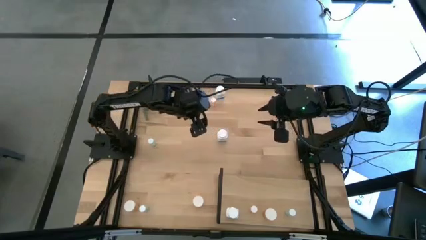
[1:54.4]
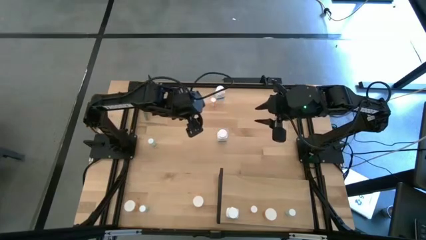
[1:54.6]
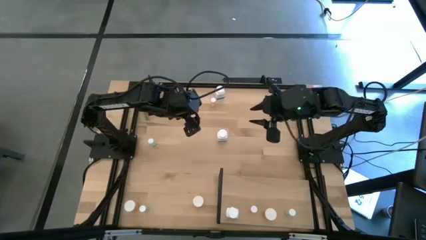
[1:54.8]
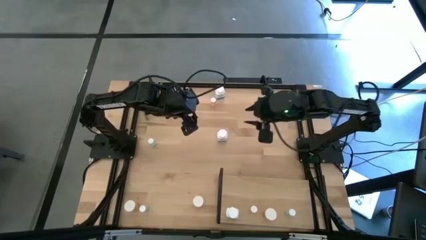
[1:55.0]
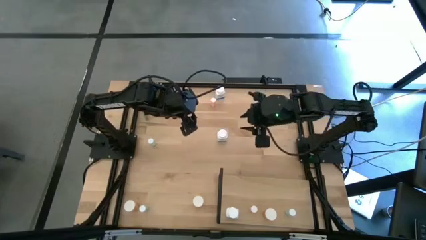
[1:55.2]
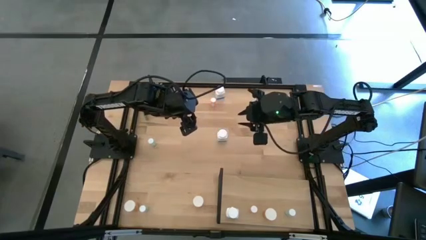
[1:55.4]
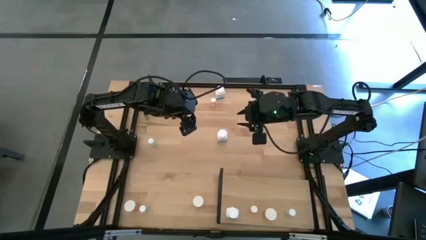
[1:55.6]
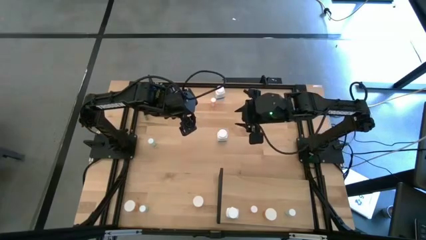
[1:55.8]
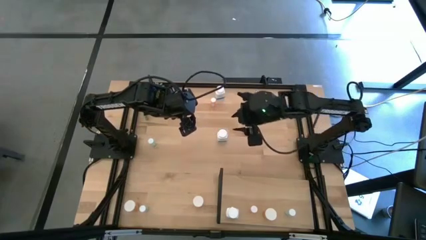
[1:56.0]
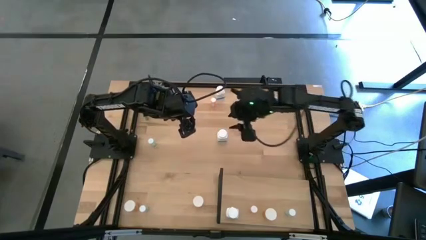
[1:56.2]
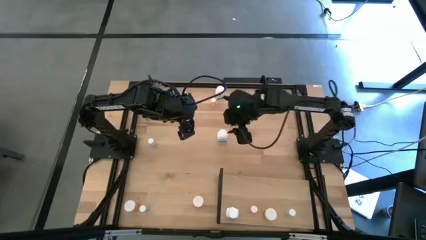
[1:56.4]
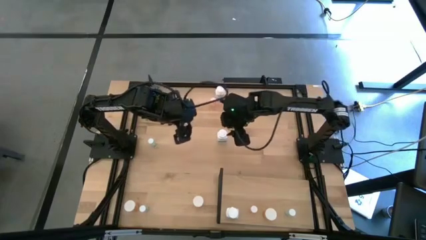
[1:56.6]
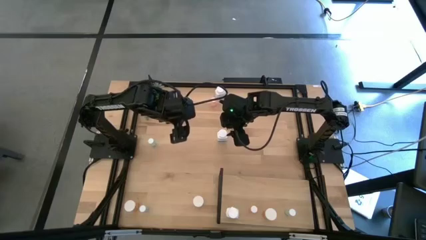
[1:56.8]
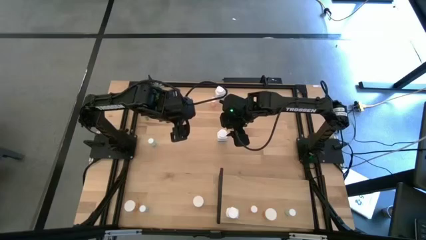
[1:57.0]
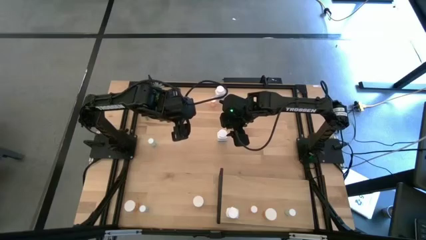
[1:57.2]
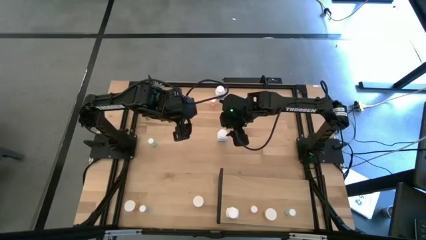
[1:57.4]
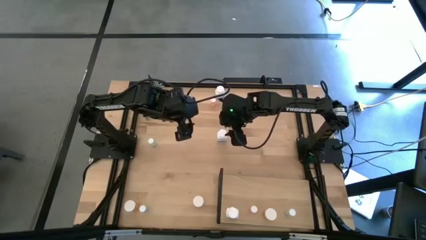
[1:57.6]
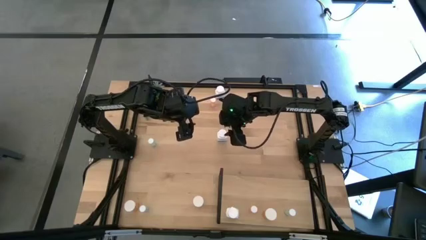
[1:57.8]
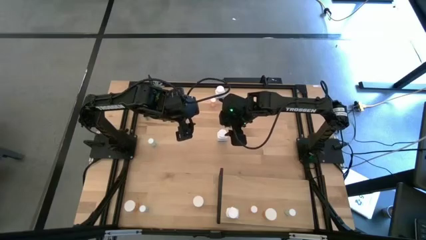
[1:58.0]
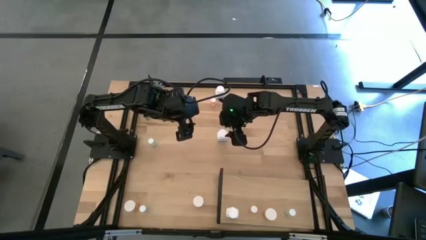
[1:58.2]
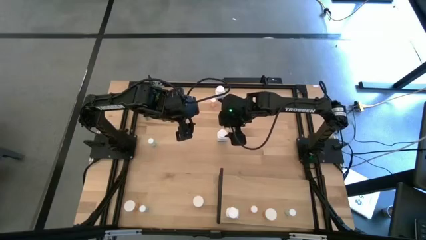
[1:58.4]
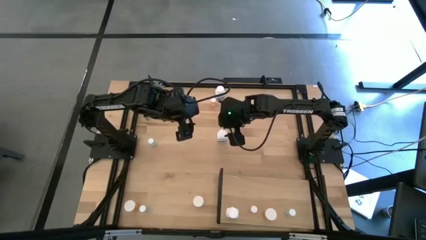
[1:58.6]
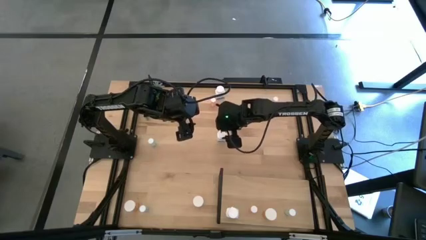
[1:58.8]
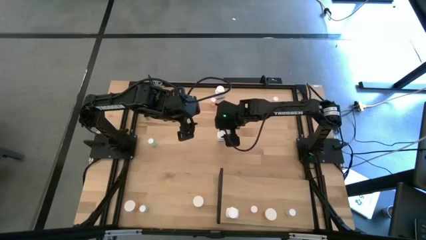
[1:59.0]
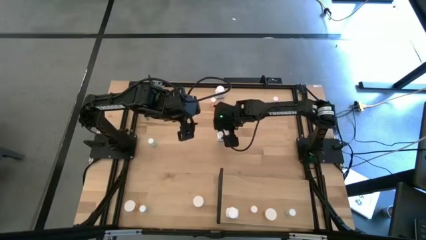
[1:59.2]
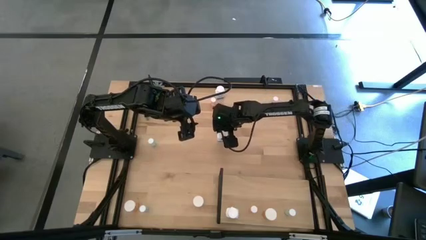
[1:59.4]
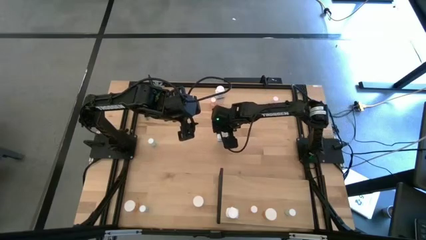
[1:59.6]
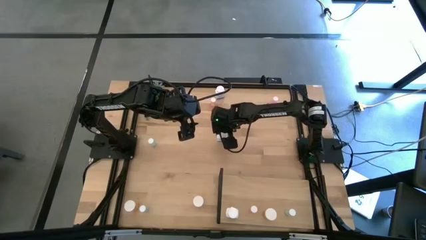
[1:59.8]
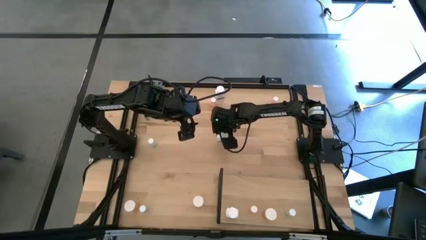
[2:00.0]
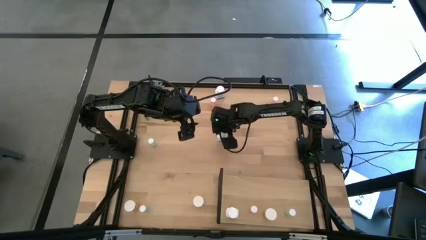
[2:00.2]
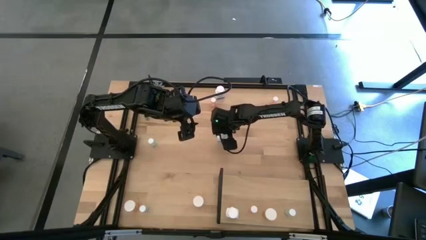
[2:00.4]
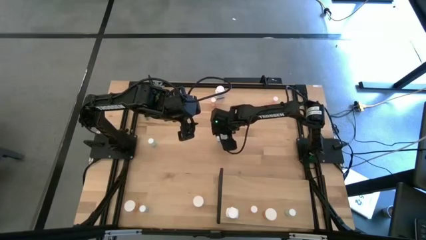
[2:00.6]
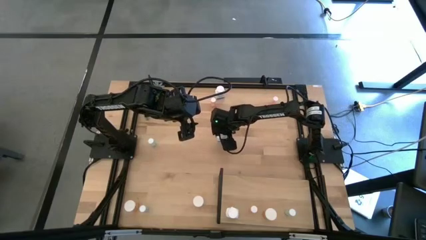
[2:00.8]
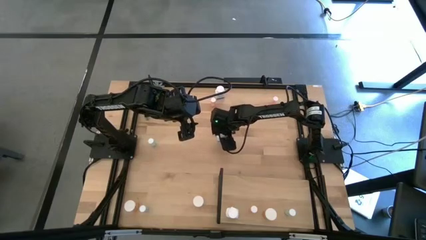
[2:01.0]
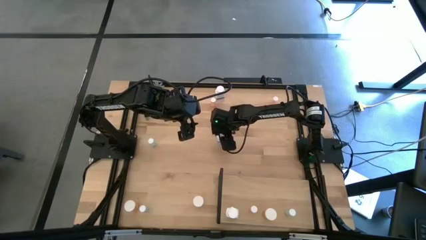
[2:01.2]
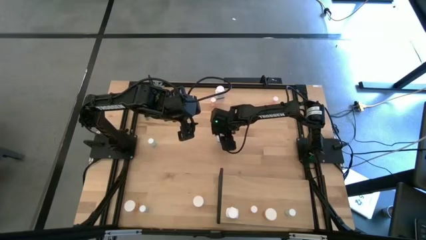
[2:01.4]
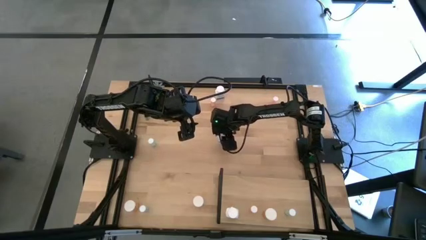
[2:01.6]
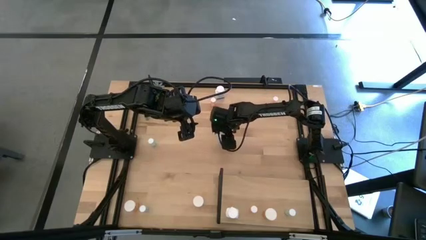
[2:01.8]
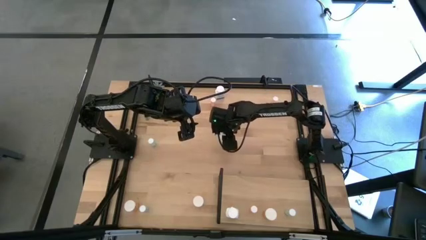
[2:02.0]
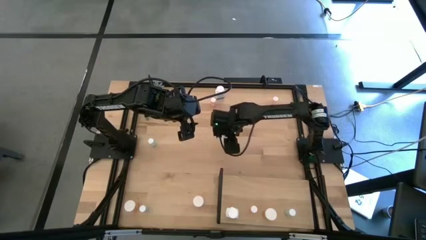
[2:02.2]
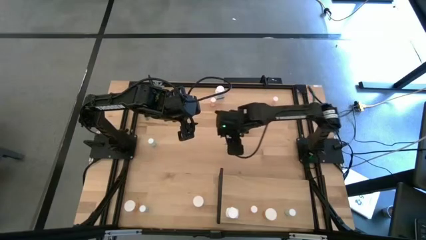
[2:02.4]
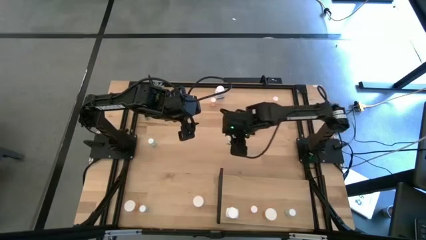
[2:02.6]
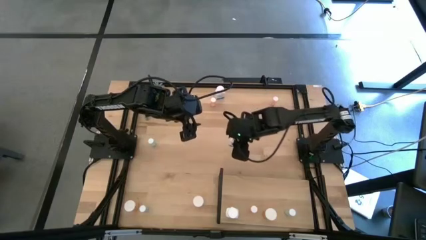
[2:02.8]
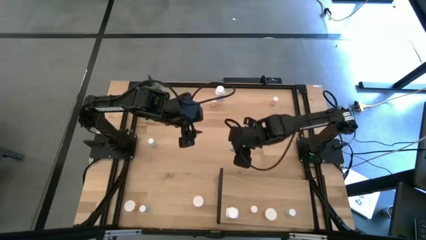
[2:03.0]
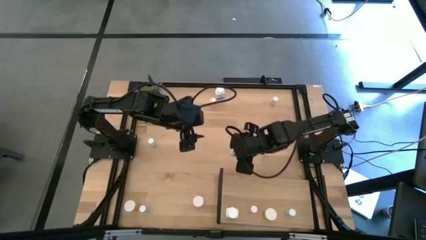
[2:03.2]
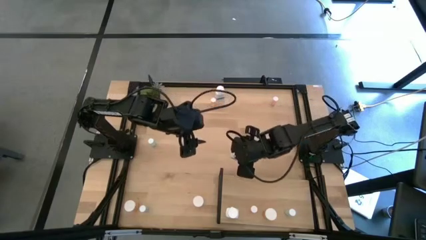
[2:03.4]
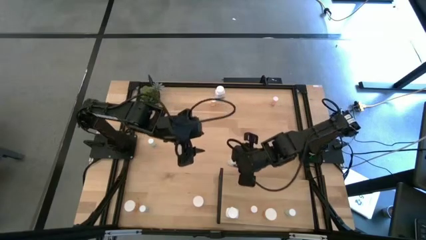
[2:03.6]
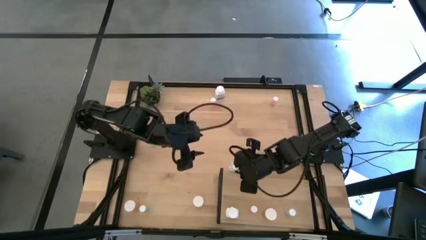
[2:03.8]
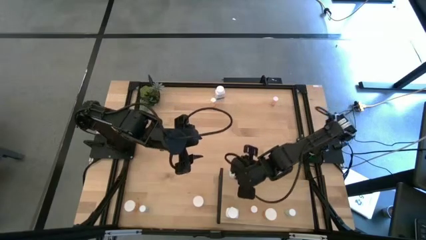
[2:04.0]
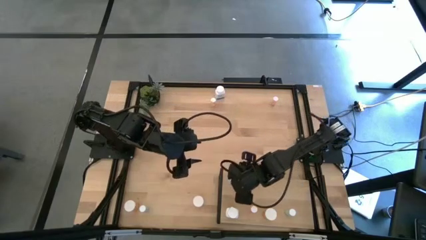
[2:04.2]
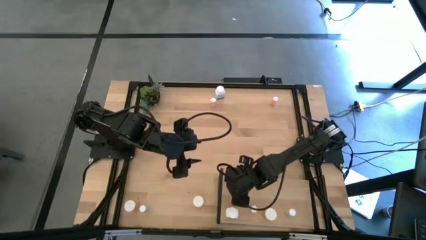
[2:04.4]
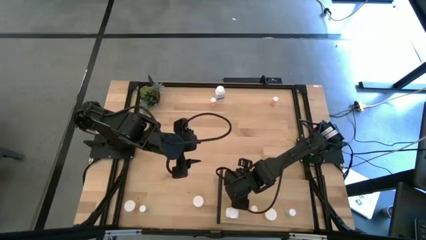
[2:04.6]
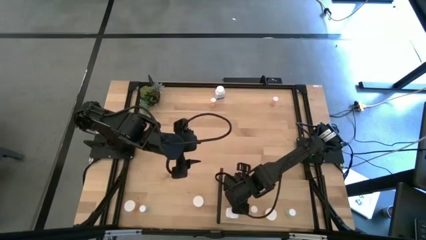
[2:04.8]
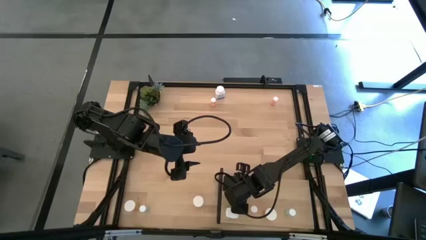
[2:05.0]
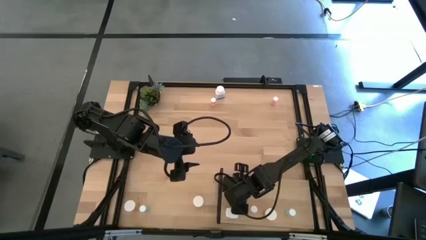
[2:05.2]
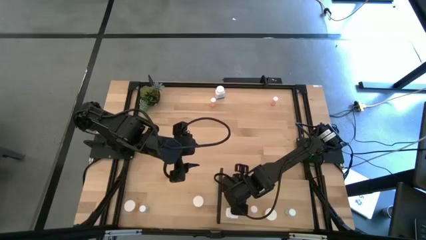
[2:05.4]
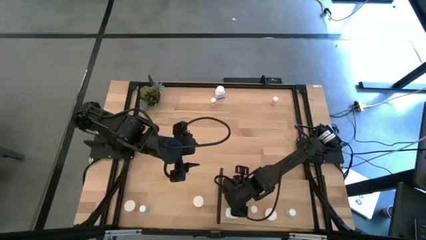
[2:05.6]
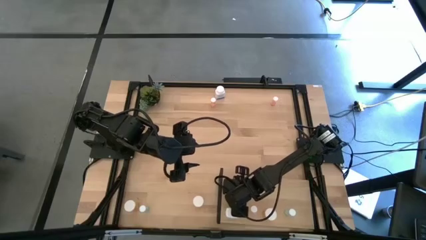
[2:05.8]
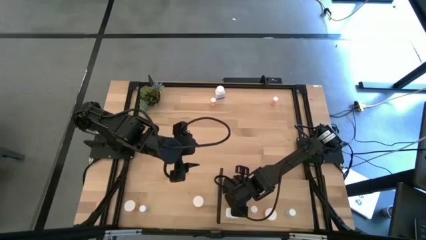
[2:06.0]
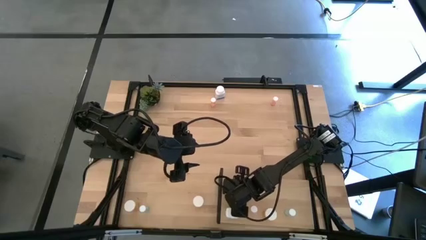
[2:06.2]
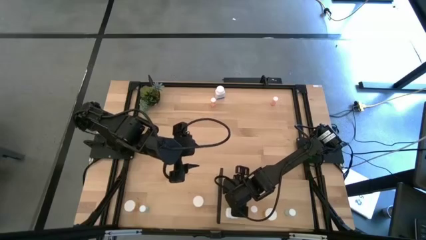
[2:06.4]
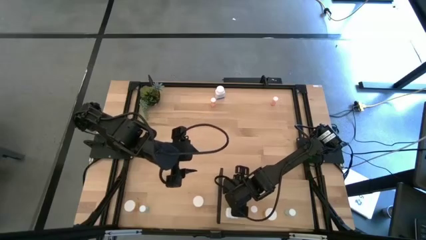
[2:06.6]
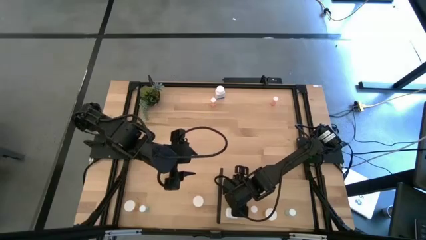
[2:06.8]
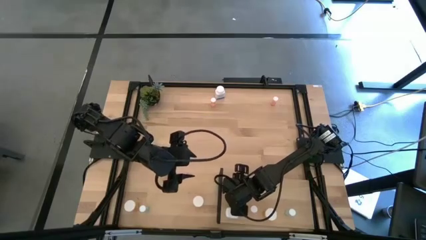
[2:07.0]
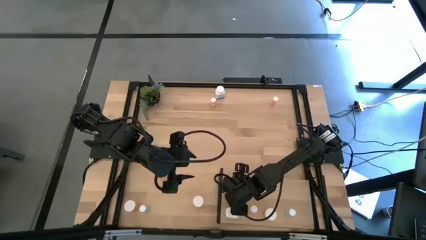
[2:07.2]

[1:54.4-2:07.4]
Task: Pick and place medicine bottles onto shelf by color
Put the middle white pill bottle on the shelf
